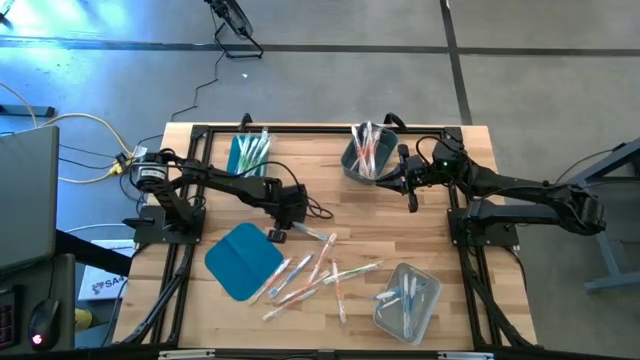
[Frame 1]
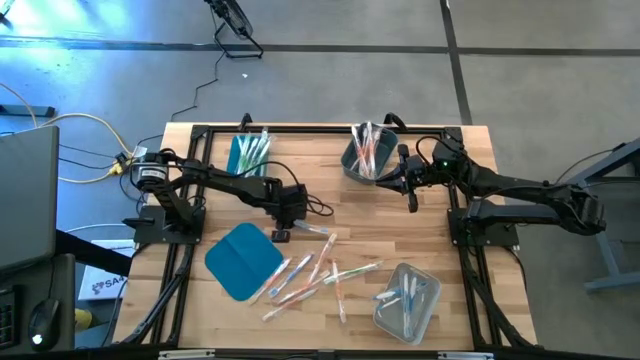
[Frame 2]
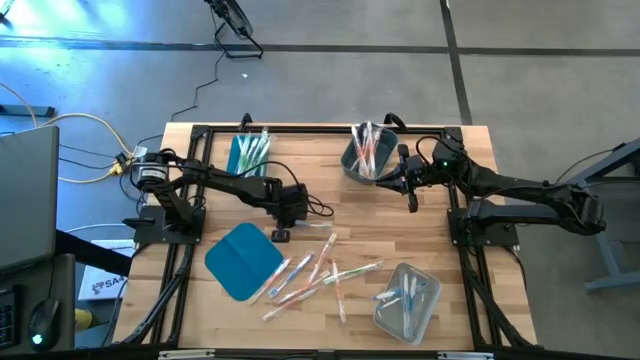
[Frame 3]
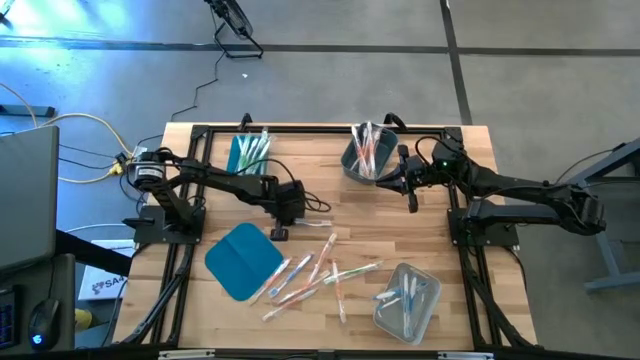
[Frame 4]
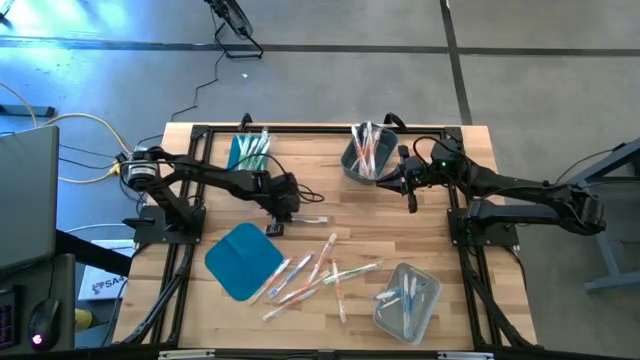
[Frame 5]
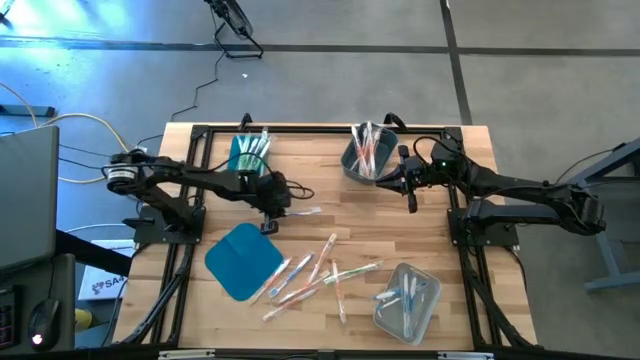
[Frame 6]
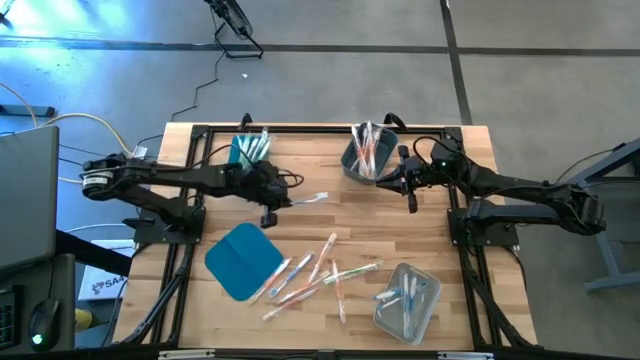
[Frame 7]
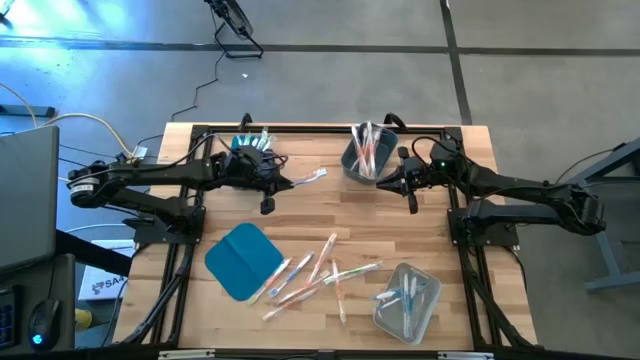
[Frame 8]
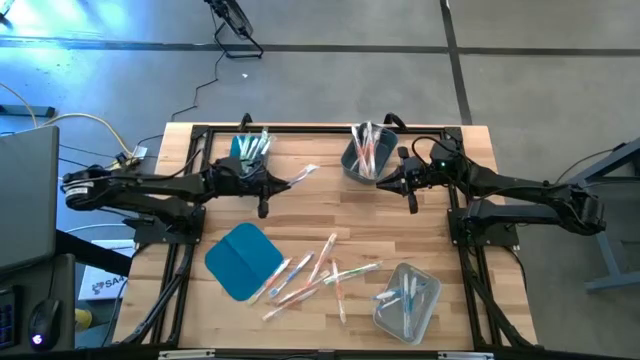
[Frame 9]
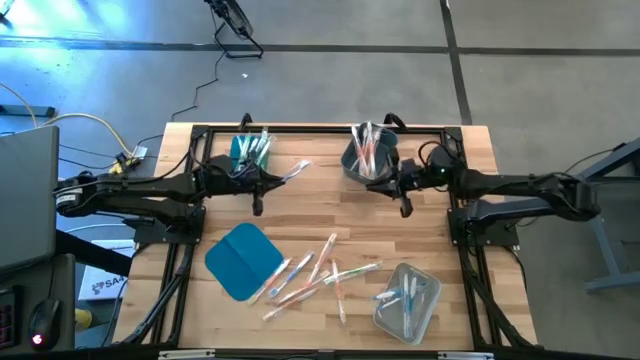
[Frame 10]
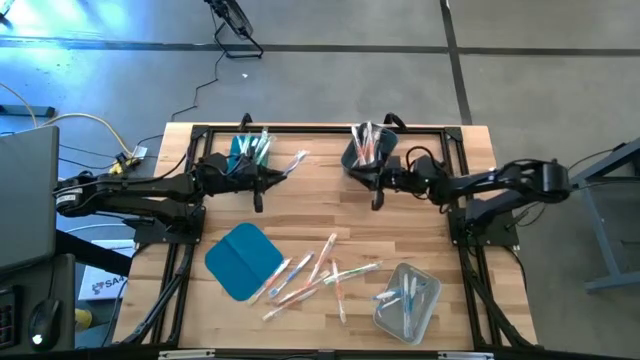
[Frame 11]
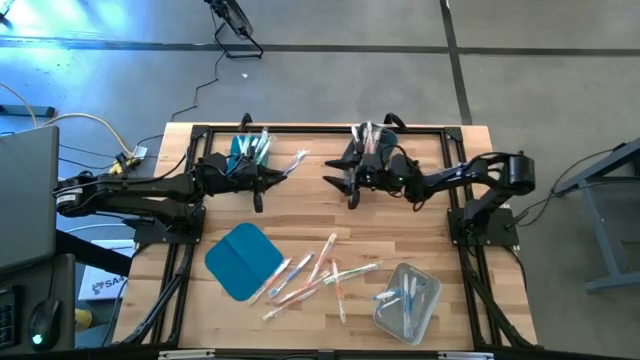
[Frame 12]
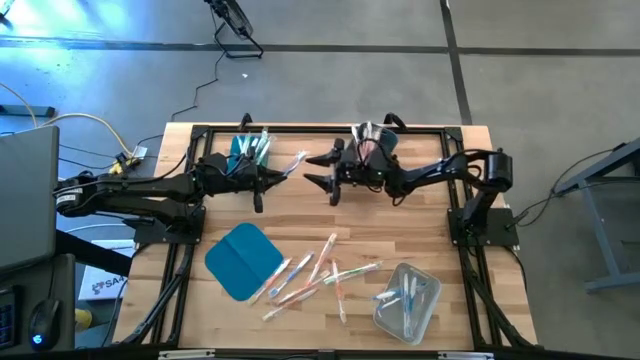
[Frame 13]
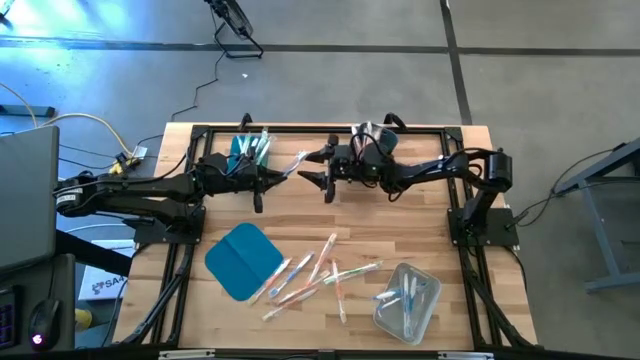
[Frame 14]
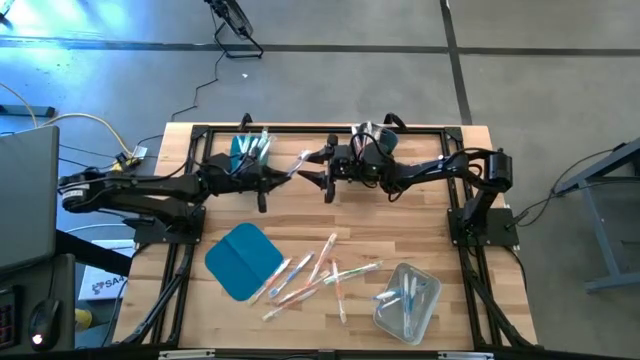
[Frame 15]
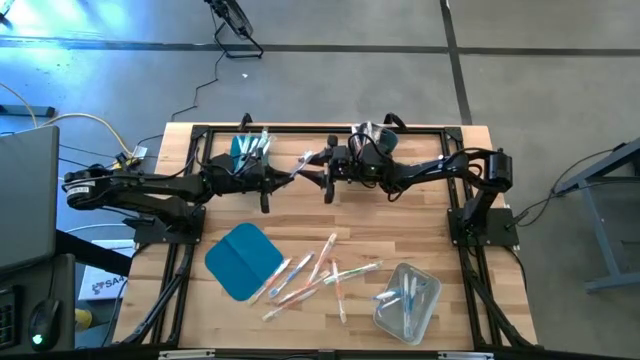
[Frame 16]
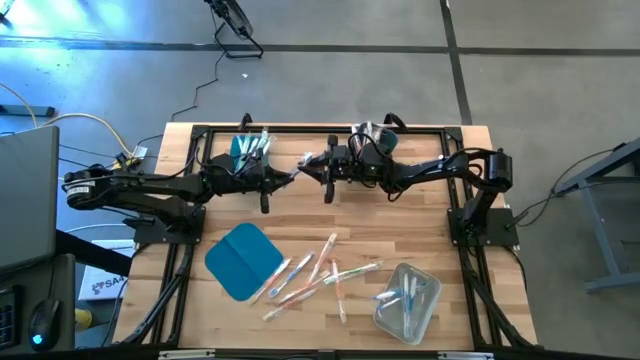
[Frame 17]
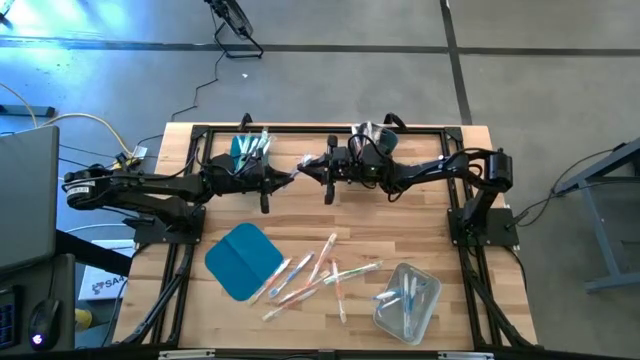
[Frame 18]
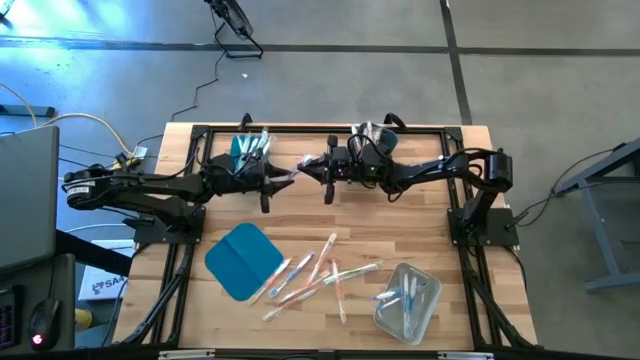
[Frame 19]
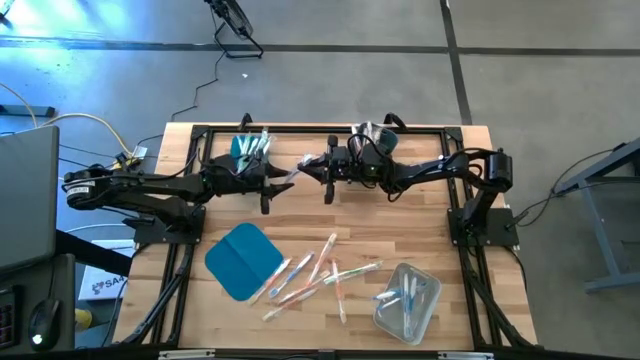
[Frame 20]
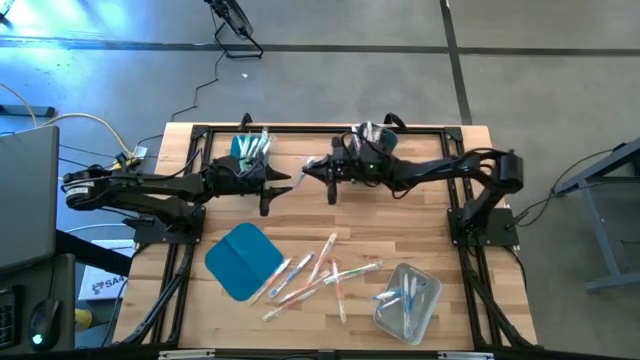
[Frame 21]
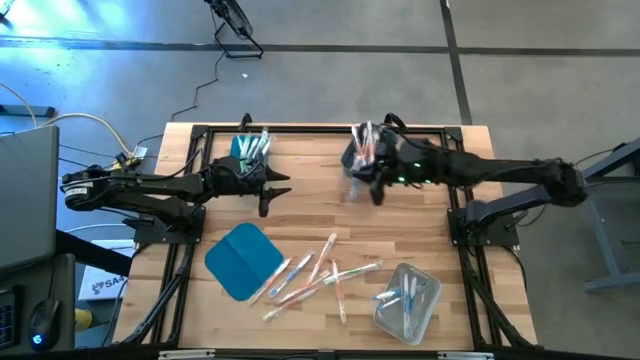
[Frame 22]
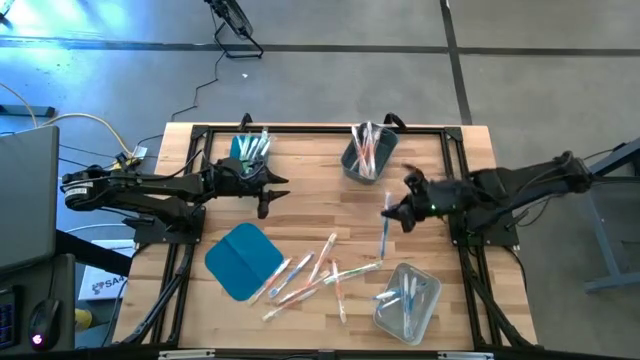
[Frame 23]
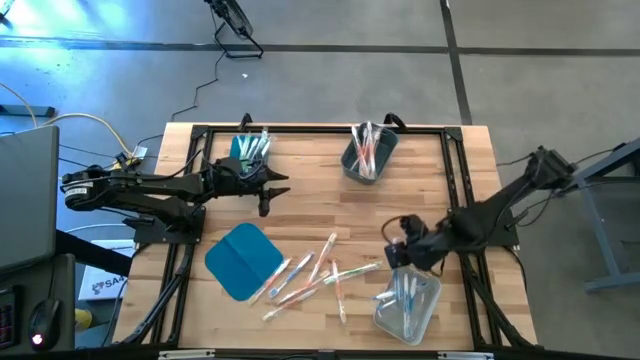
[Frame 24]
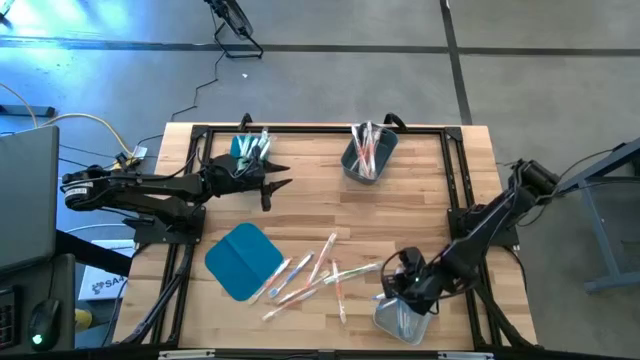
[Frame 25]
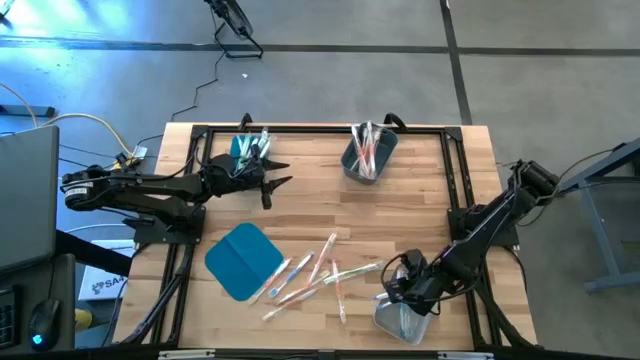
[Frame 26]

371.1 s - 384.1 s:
Task: Pick & Place Toothbrushes
Put the top blue toothbrush into the light gray bin

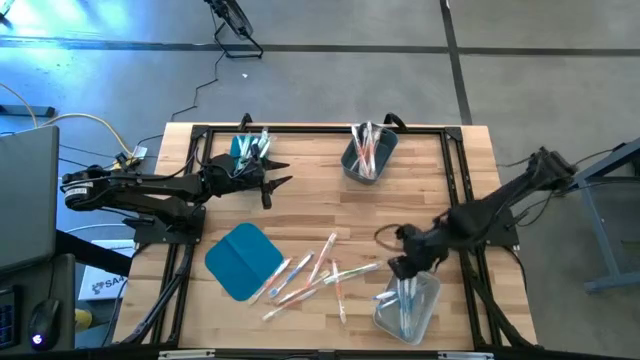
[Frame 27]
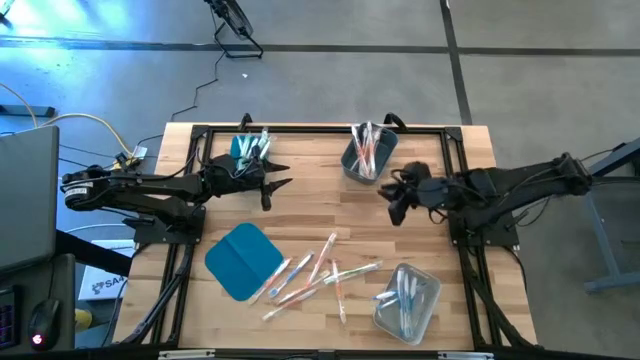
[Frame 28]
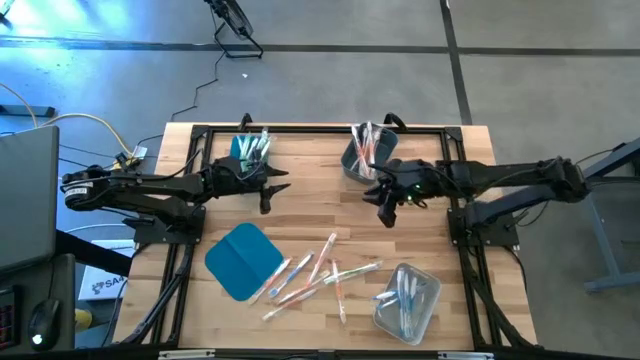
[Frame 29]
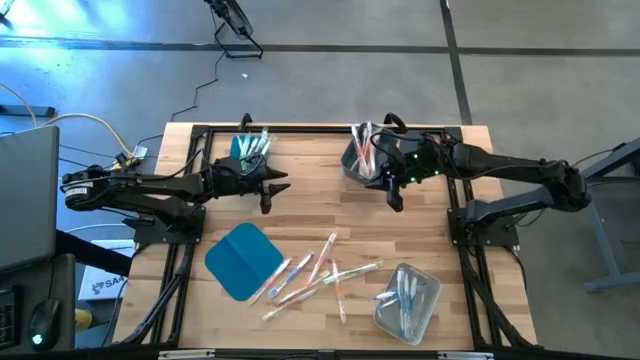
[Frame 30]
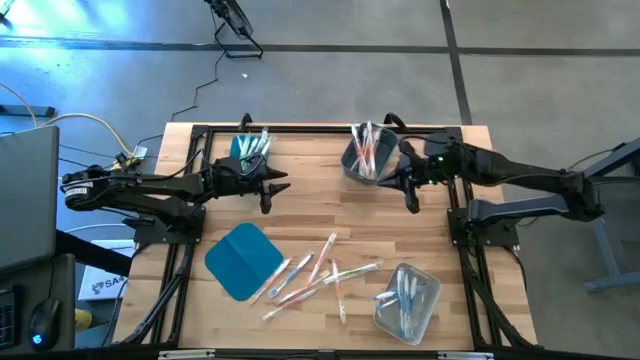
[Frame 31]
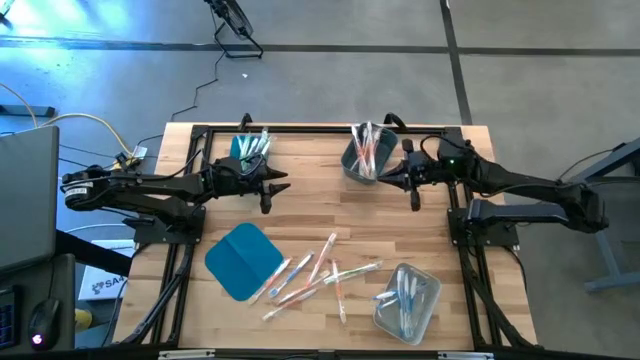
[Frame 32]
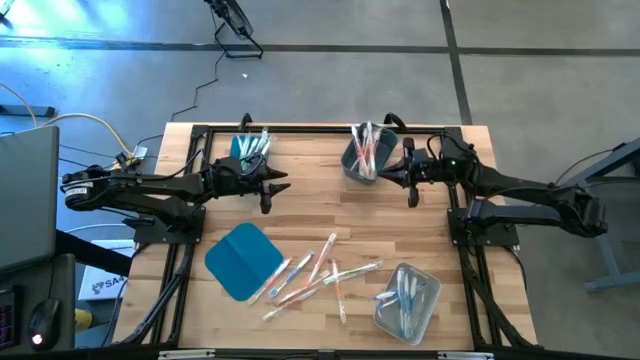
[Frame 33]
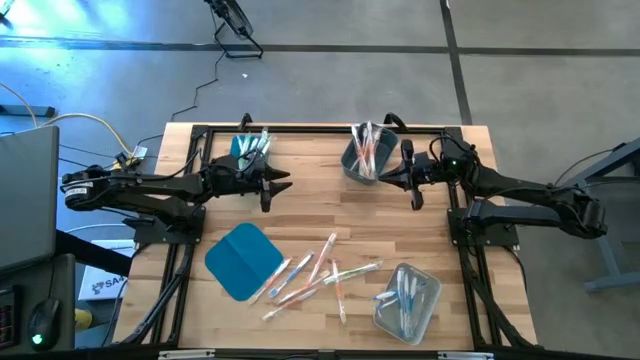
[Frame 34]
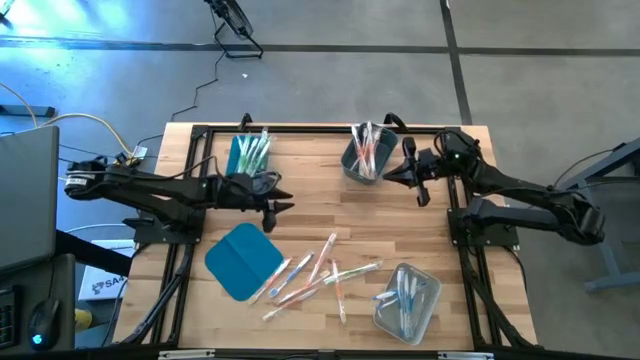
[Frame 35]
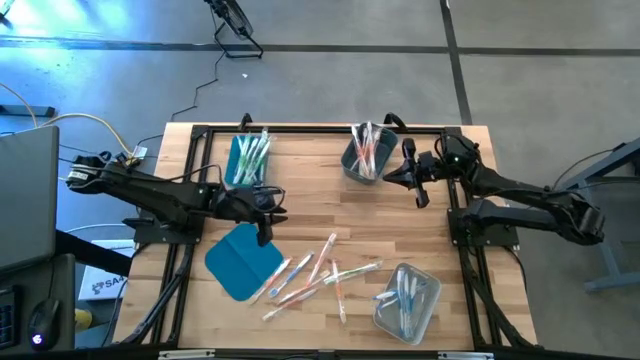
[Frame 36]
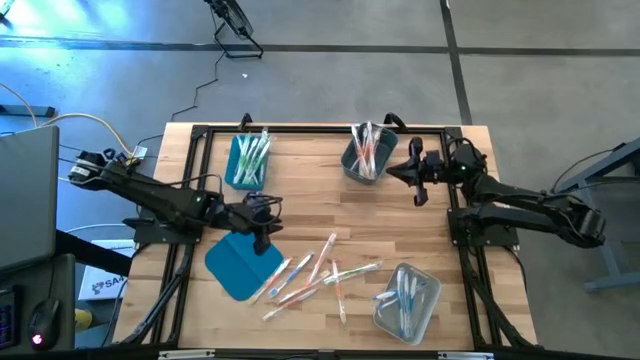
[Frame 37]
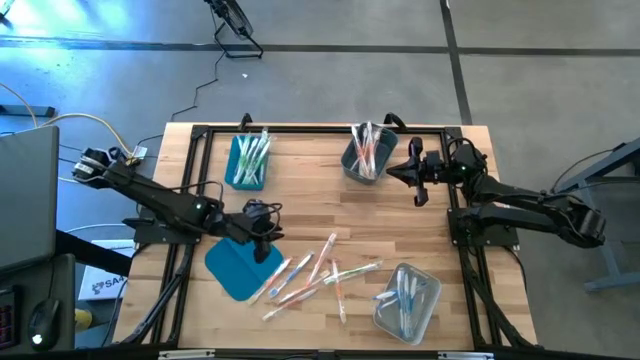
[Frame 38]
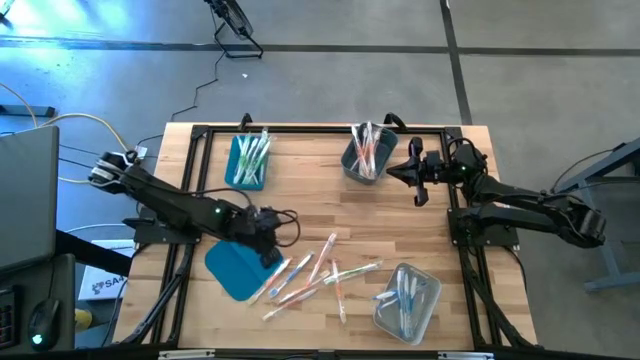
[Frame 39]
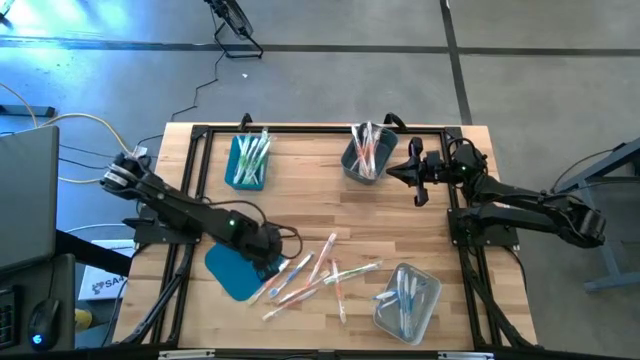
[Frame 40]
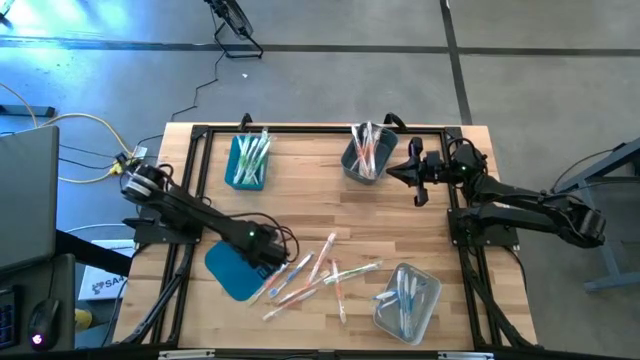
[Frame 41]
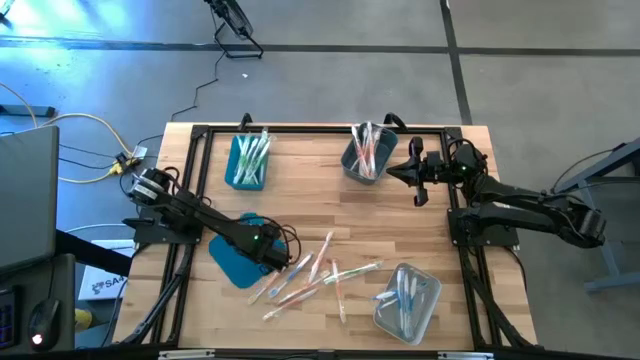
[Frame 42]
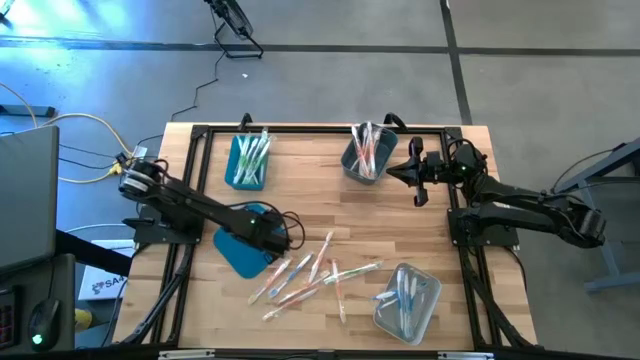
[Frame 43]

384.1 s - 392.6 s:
Adjust the blue tablemat
